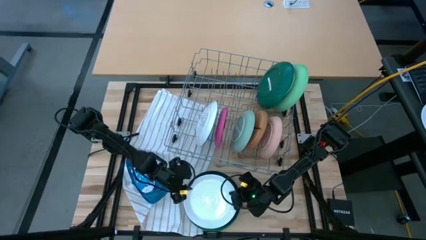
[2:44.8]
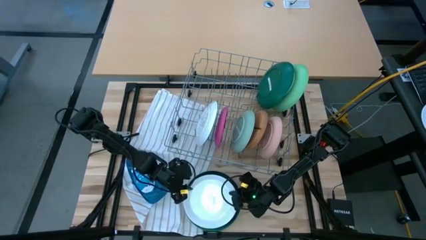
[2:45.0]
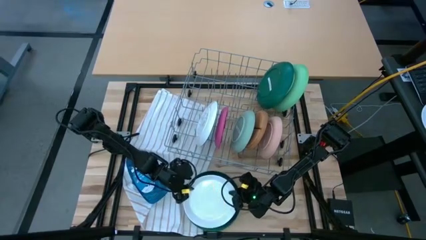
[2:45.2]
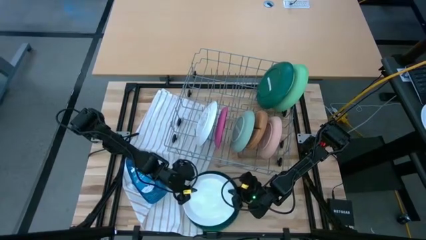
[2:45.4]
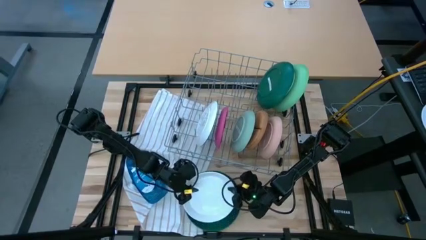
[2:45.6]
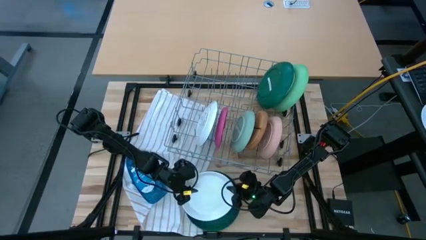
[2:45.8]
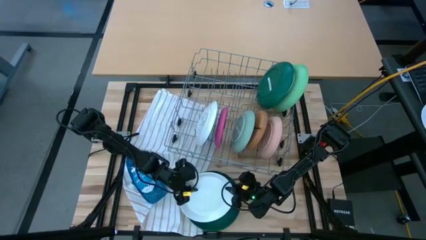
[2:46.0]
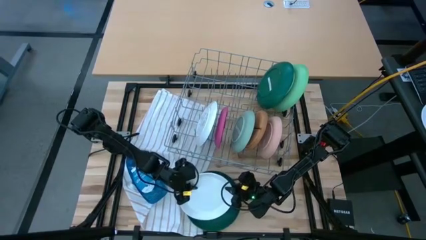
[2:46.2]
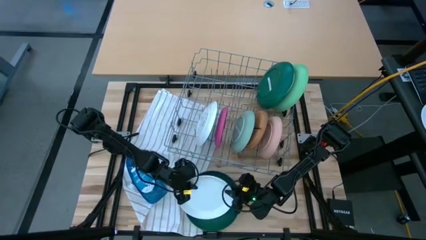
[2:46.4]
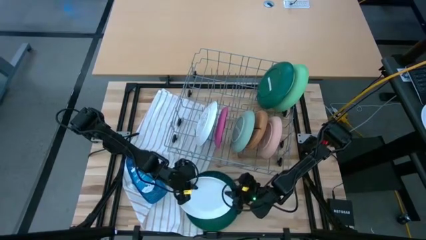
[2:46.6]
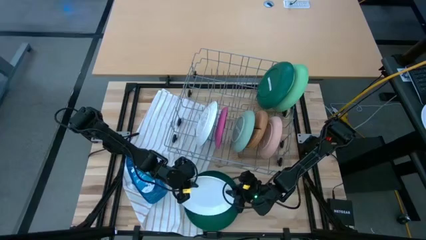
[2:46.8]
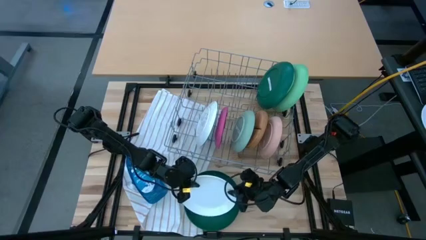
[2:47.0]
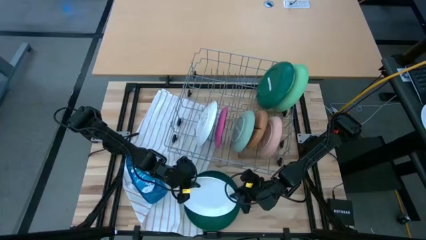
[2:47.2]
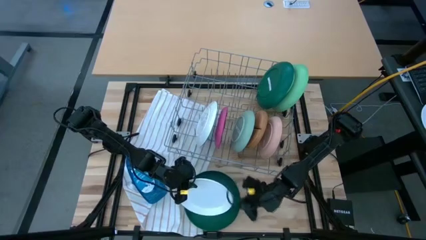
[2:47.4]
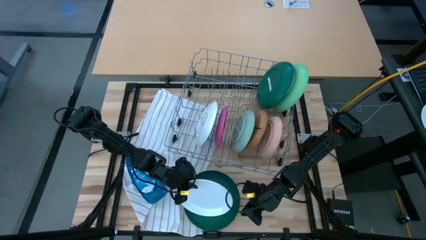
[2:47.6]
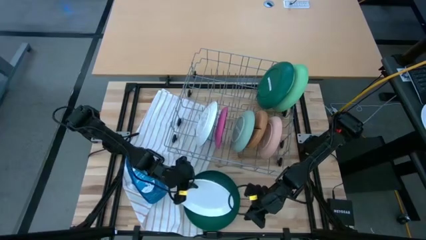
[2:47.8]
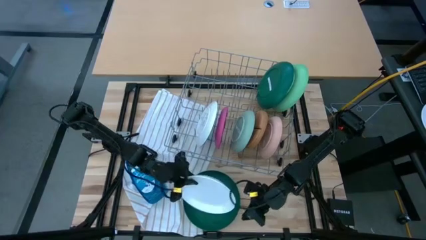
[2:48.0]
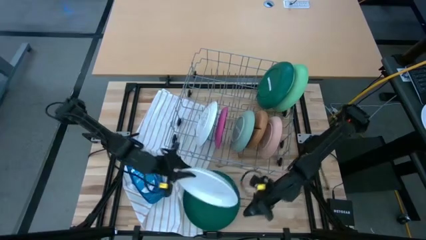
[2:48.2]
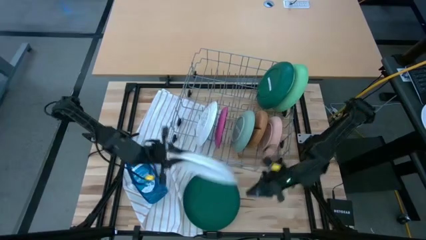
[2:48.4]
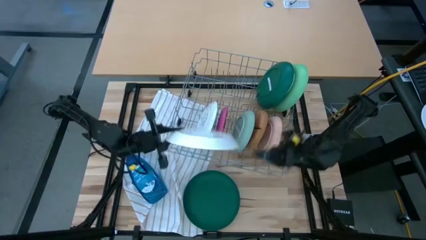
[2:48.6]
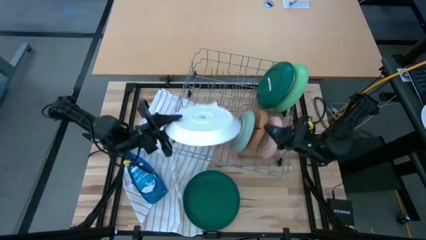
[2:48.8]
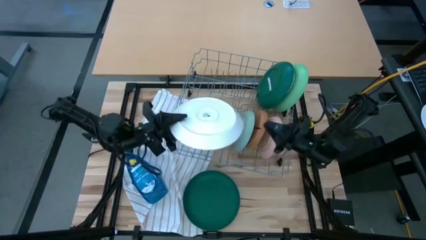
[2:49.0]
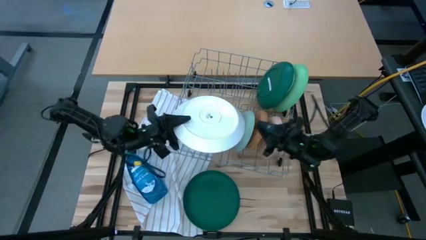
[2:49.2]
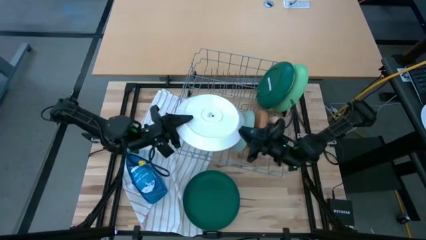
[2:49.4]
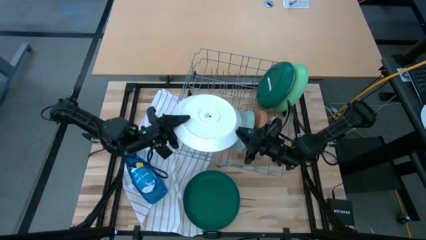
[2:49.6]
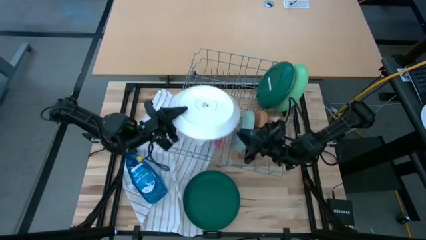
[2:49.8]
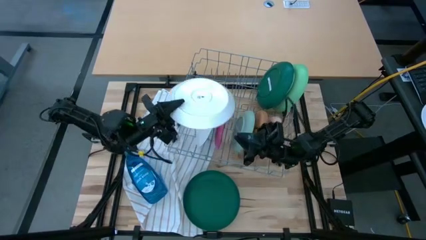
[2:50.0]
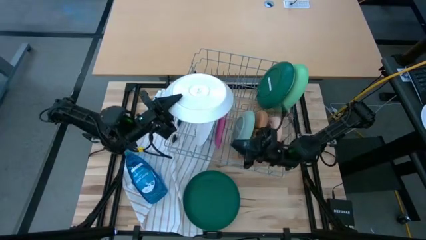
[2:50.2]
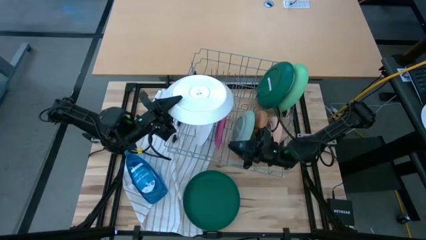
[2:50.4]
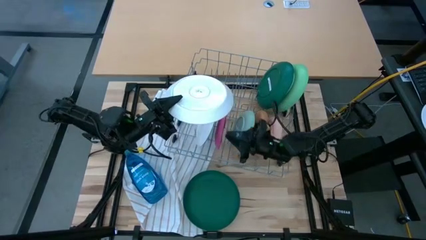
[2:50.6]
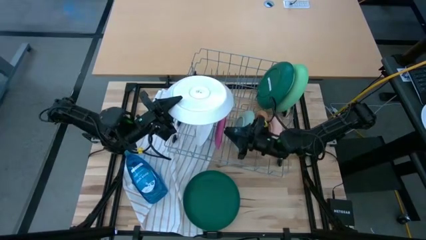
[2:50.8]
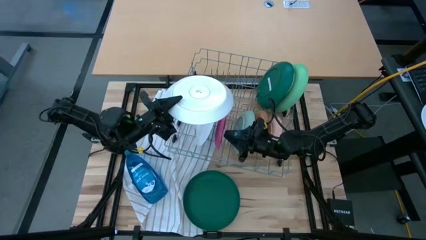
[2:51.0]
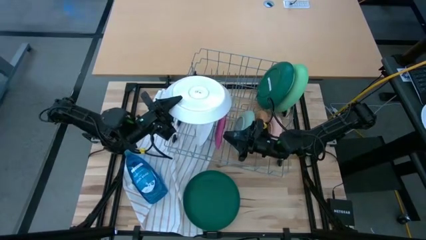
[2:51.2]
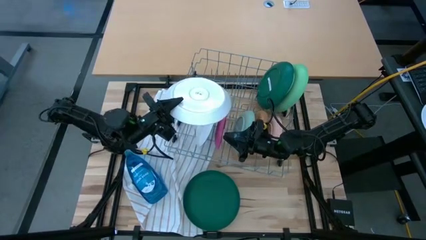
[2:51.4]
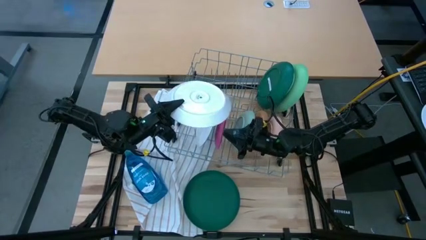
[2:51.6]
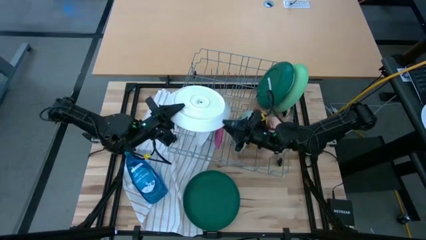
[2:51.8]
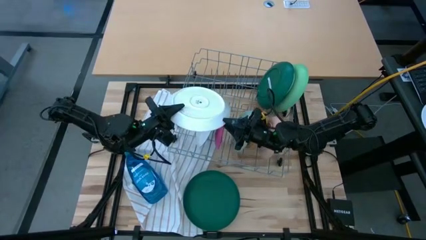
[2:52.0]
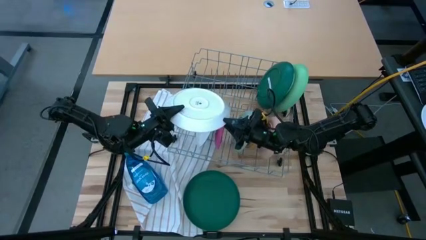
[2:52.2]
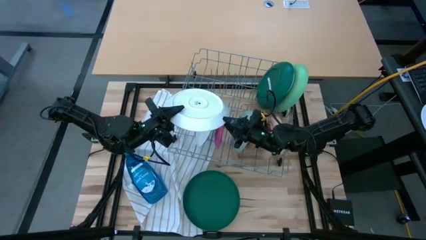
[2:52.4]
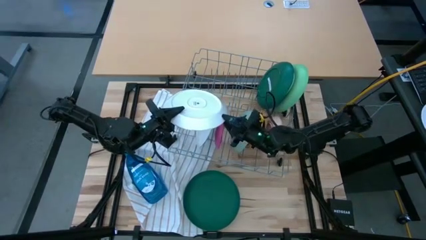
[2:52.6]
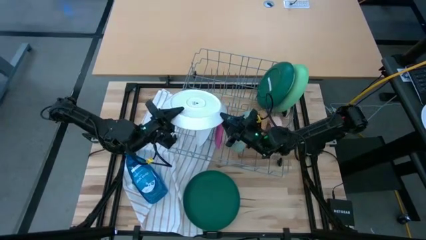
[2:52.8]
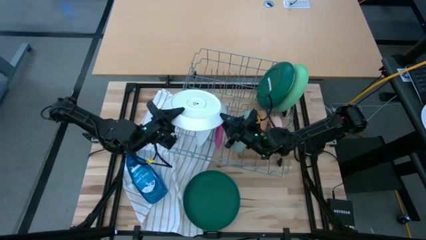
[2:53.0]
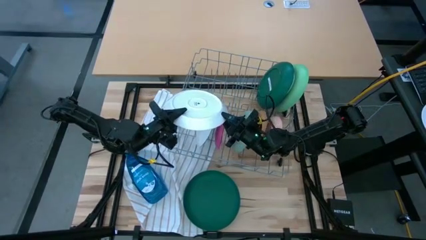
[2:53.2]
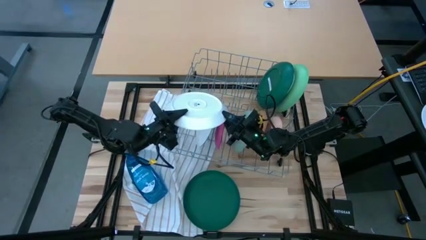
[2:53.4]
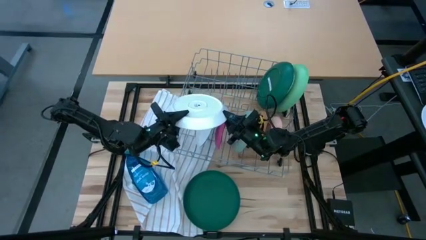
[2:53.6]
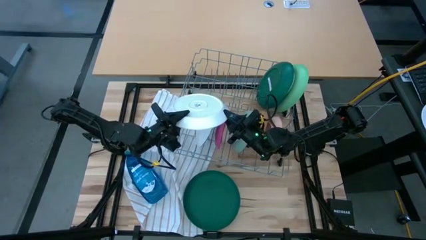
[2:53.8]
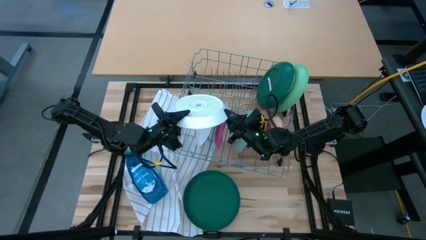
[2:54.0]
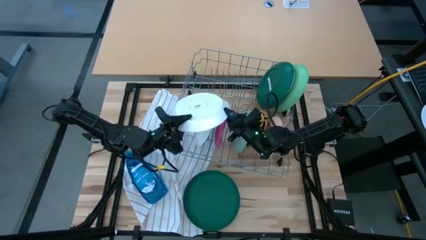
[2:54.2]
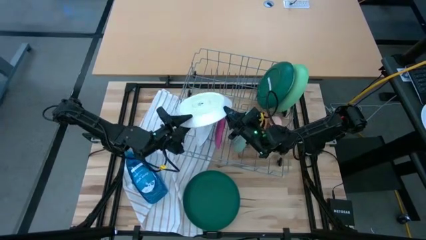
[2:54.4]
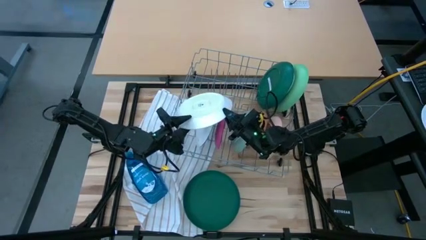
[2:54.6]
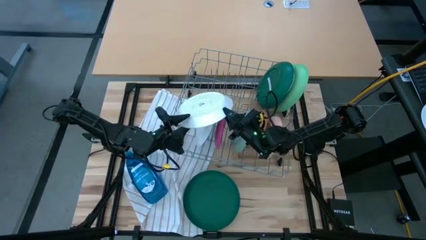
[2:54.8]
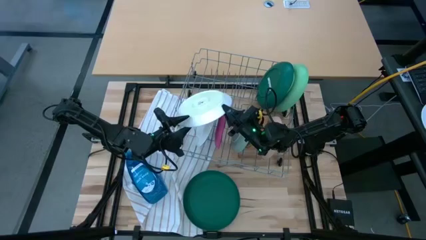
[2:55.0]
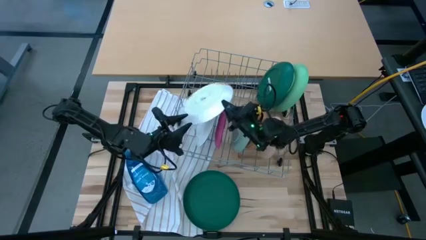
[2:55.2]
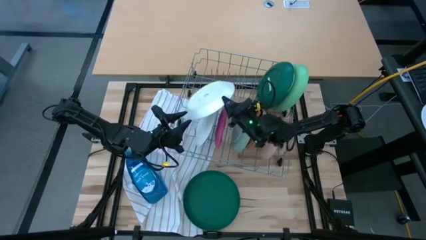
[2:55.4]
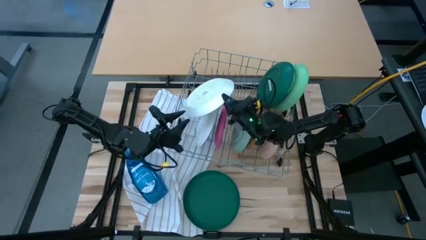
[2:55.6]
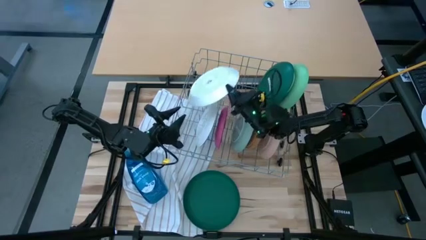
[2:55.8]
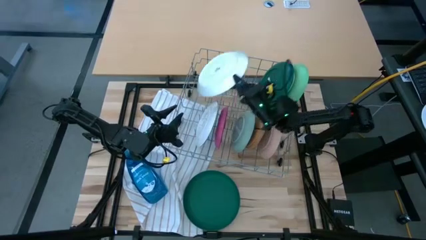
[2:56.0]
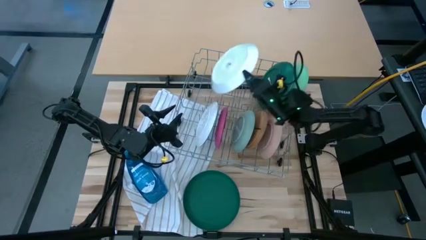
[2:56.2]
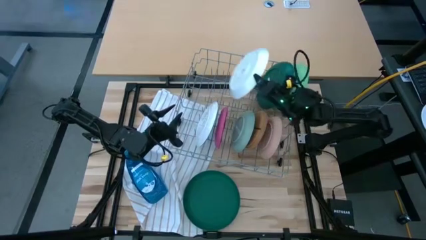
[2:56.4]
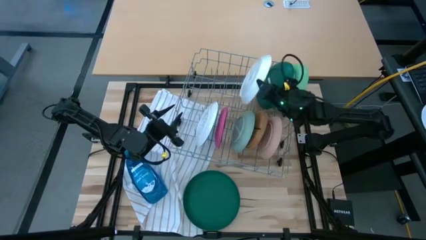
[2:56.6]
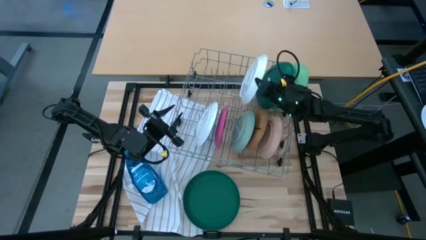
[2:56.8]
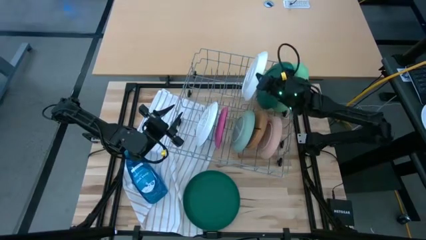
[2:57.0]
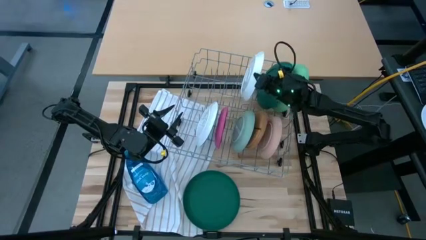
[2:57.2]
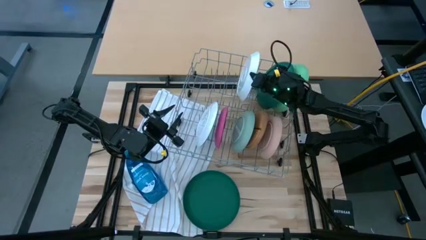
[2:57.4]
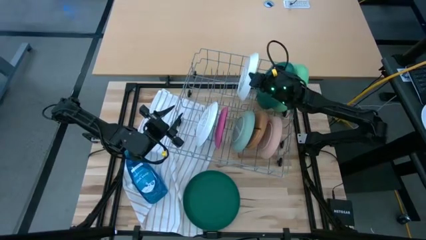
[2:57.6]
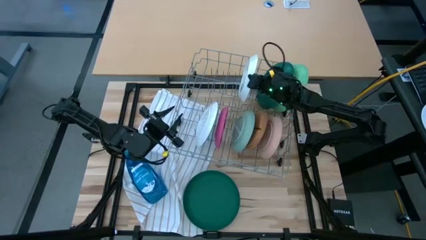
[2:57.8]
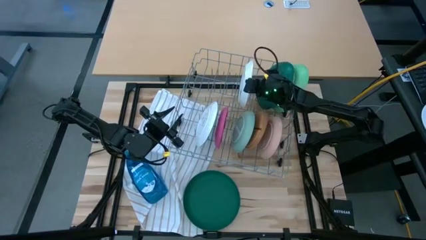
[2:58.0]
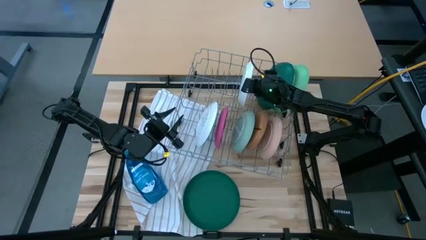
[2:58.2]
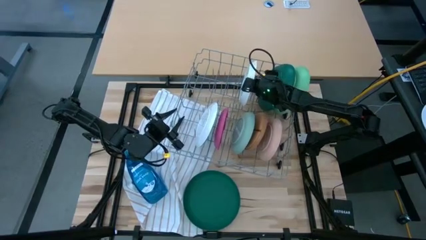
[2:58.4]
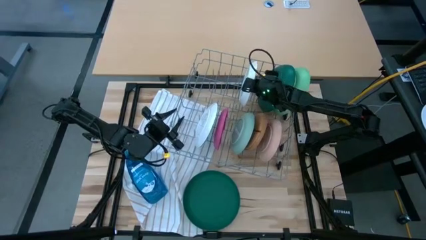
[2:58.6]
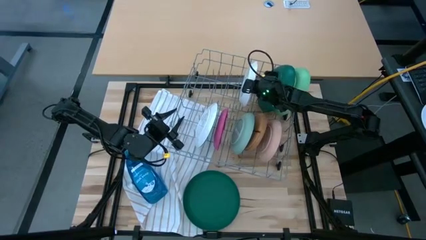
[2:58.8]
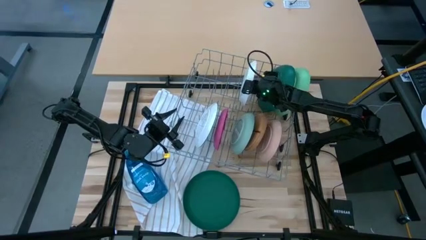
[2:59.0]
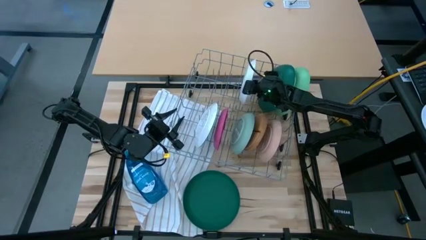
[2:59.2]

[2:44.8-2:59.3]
Task: Sort dishes
Put the white plate in the dish rack

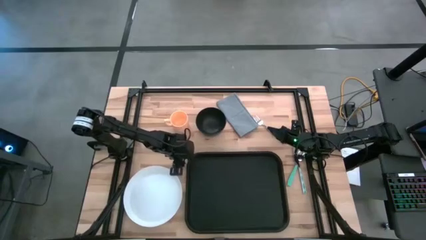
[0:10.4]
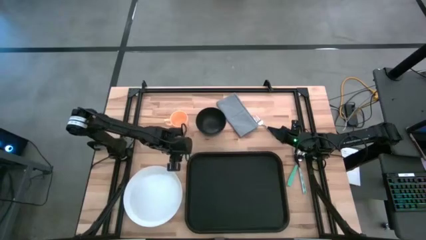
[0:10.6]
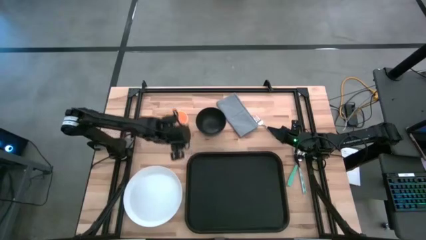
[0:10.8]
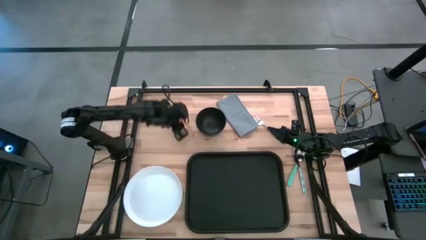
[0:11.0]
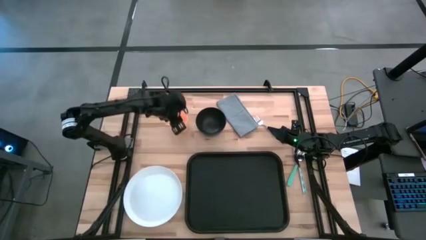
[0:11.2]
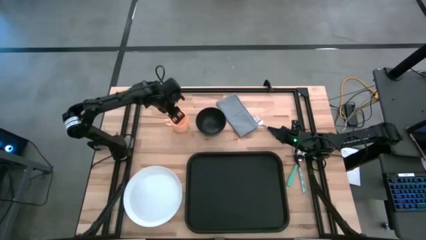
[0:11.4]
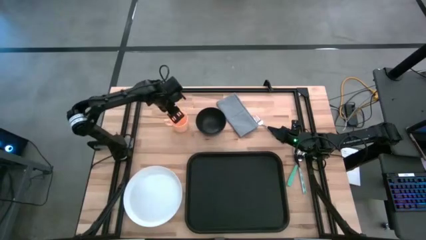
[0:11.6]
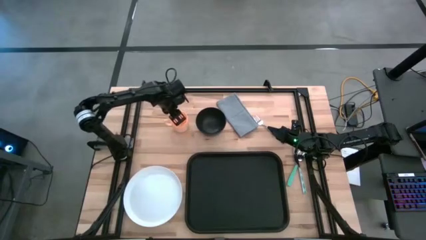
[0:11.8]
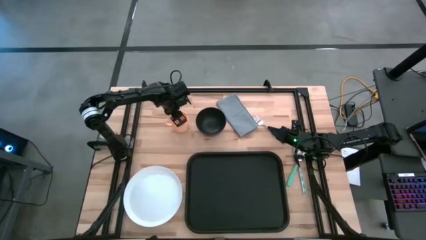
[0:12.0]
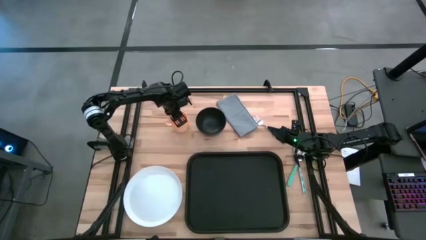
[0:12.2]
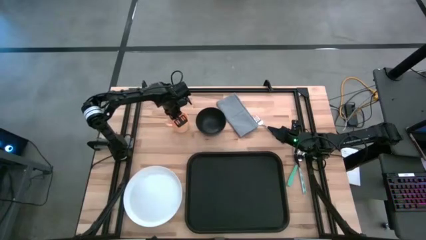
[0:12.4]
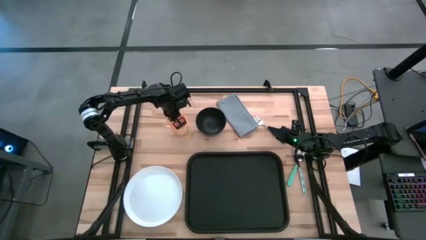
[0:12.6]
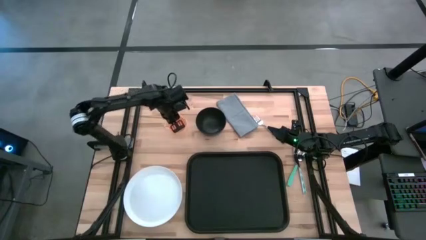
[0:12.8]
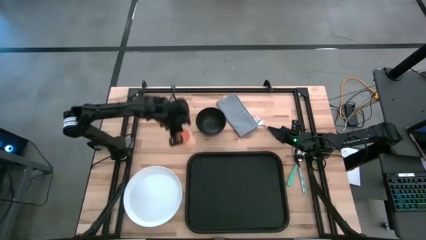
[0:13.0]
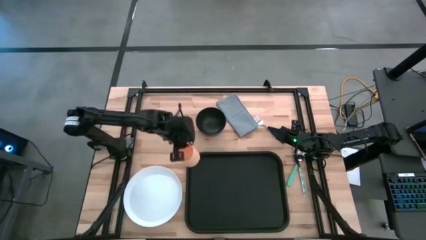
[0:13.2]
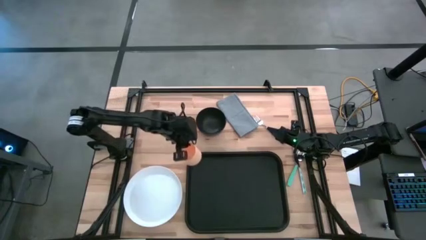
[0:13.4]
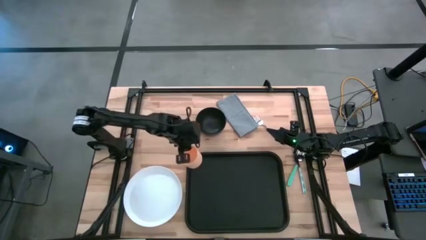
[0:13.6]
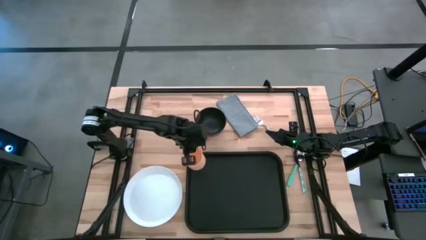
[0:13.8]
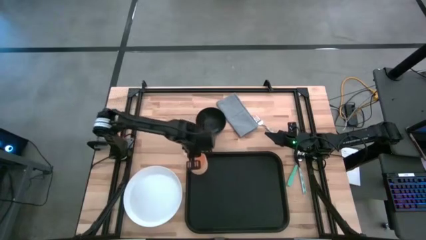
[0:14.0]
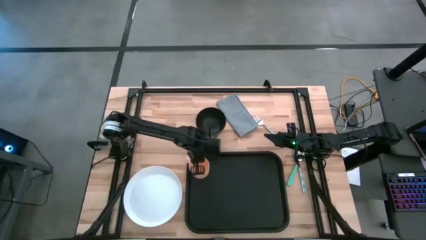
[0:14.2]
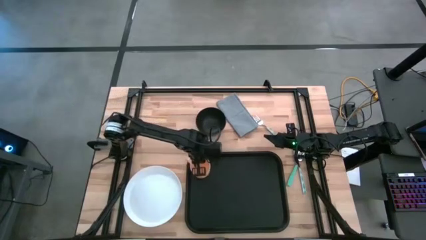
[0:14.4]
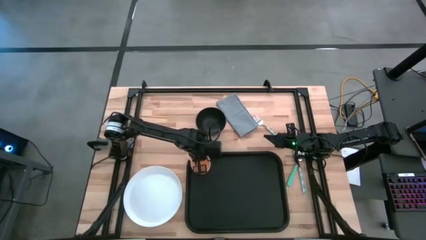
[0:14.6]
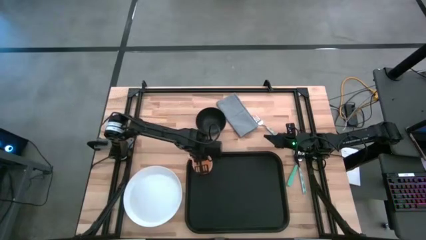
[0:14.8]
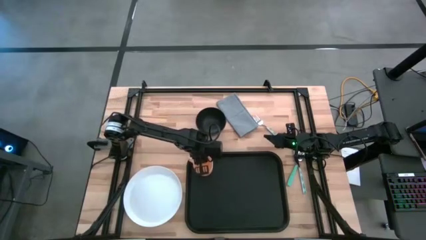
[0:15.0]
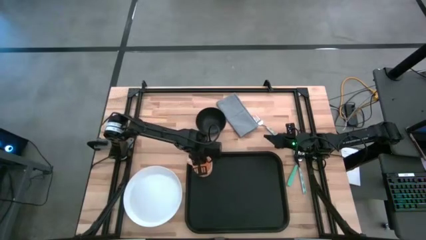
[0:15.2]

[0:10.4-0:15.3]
Task: Set up tray
Put the orange mug on the top left of the black tray
